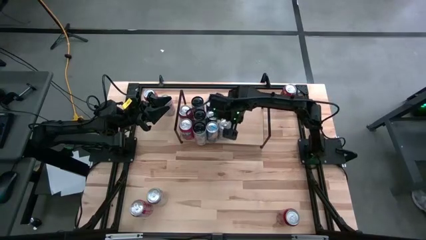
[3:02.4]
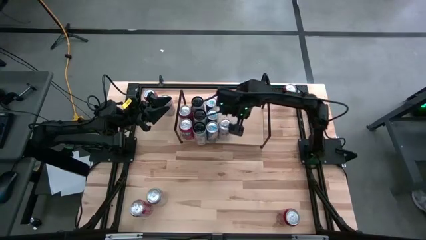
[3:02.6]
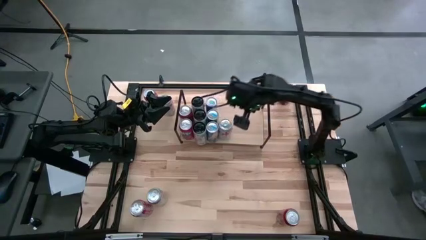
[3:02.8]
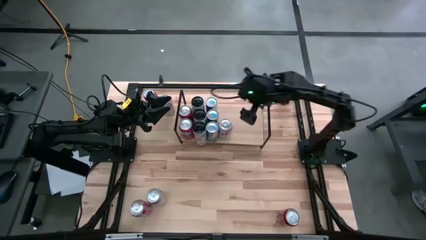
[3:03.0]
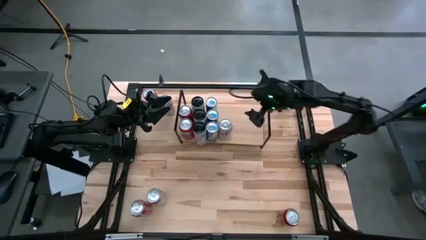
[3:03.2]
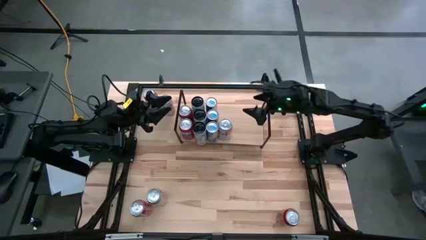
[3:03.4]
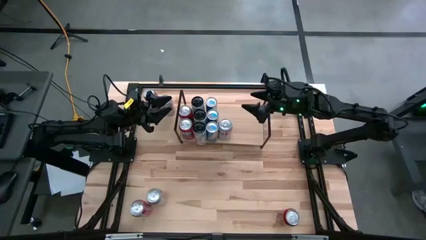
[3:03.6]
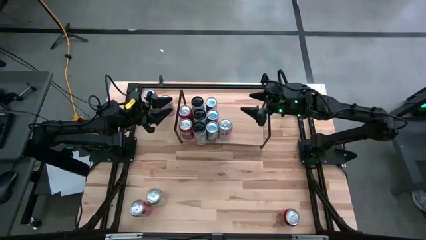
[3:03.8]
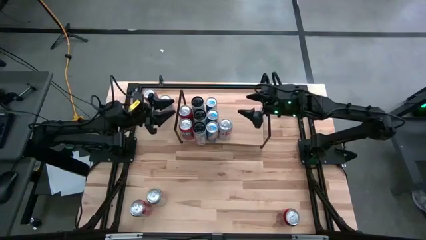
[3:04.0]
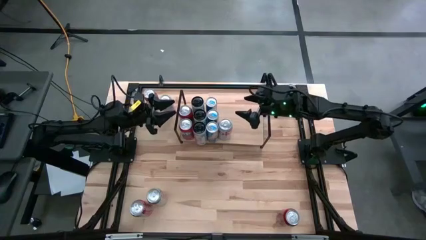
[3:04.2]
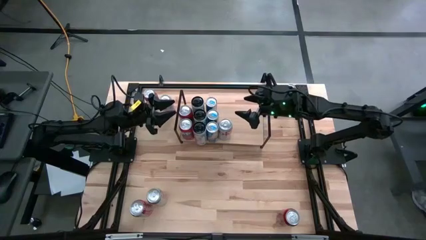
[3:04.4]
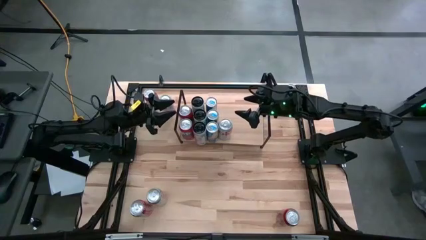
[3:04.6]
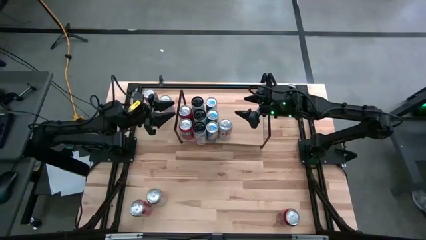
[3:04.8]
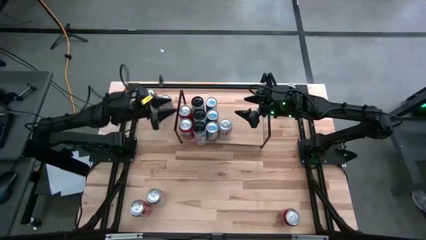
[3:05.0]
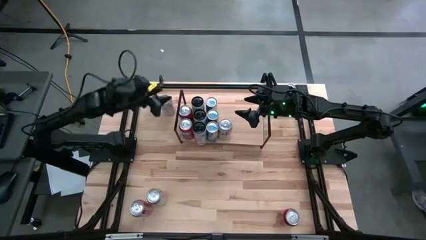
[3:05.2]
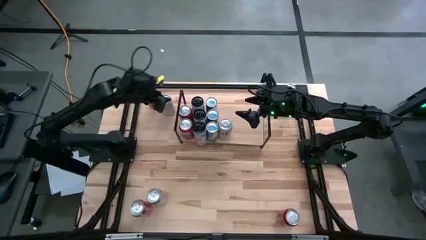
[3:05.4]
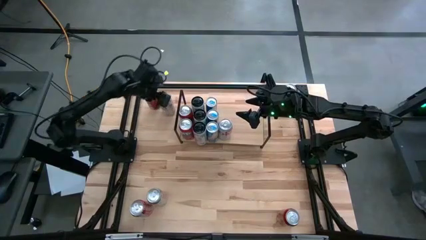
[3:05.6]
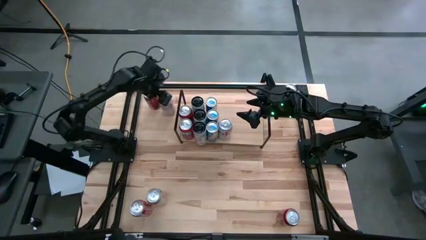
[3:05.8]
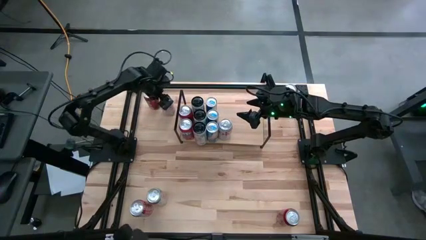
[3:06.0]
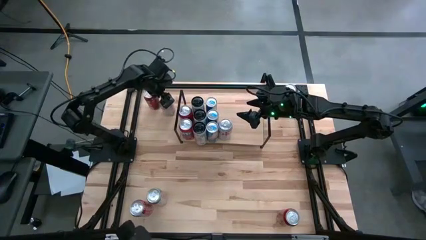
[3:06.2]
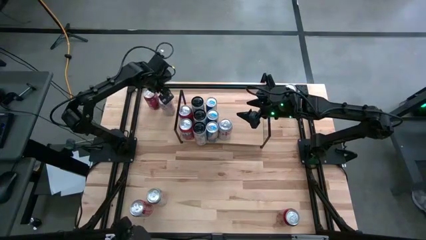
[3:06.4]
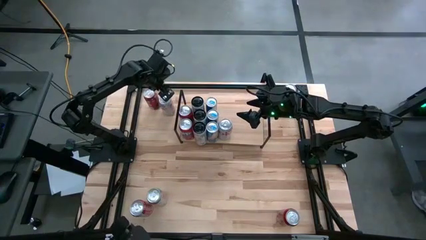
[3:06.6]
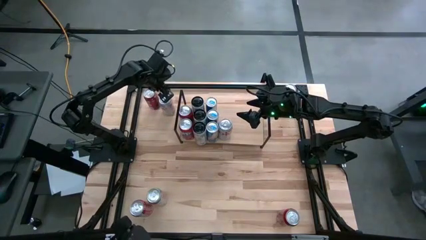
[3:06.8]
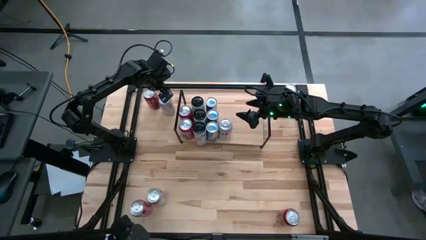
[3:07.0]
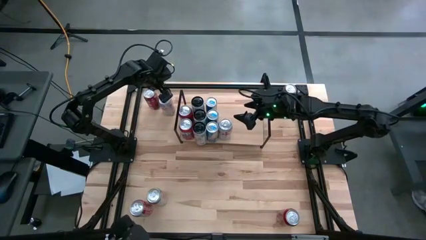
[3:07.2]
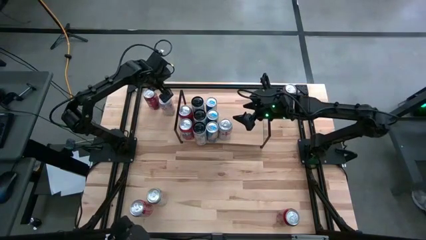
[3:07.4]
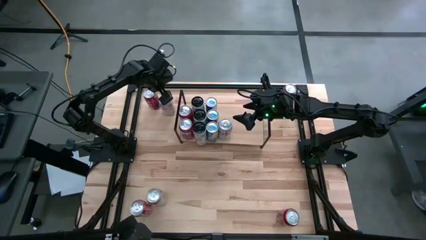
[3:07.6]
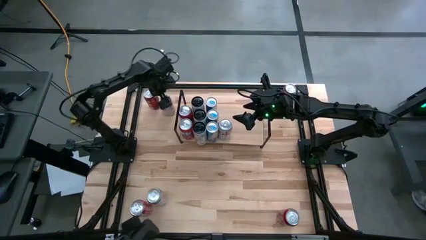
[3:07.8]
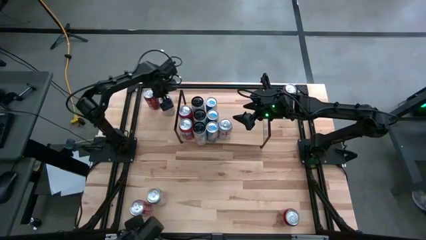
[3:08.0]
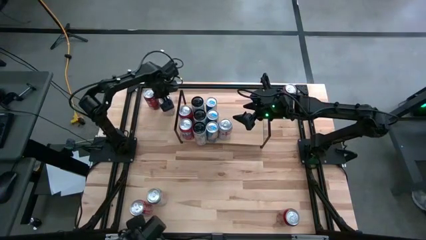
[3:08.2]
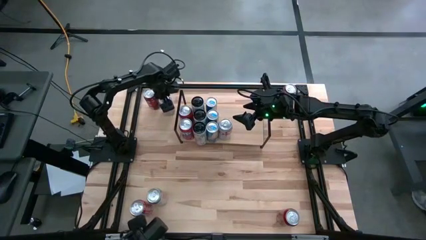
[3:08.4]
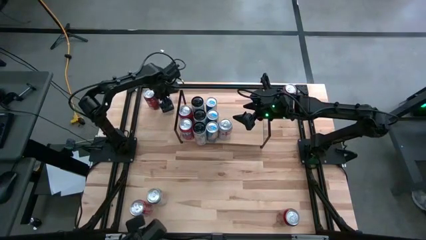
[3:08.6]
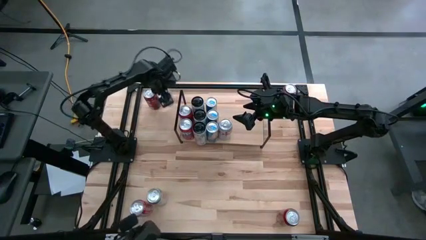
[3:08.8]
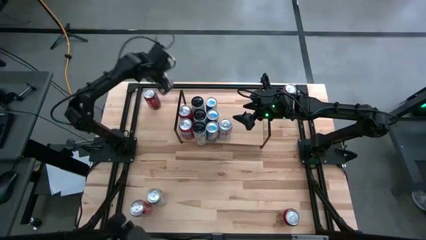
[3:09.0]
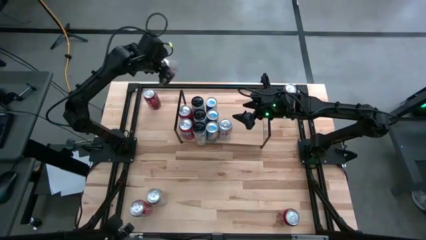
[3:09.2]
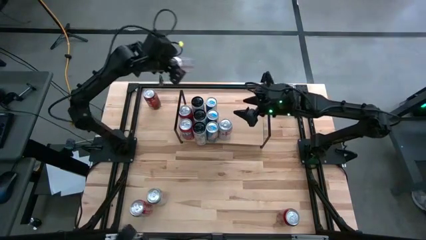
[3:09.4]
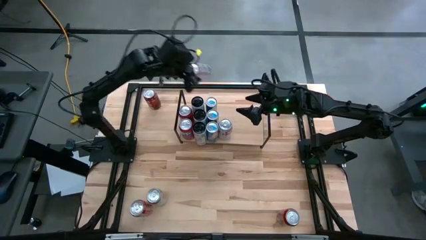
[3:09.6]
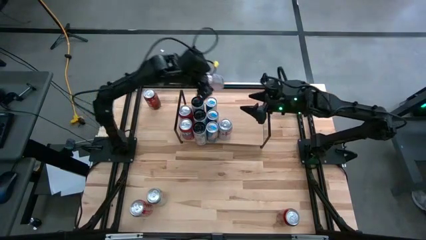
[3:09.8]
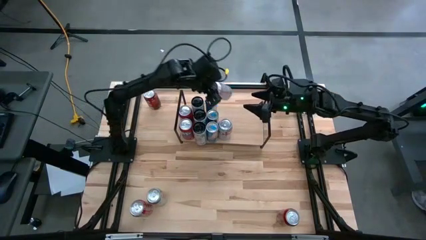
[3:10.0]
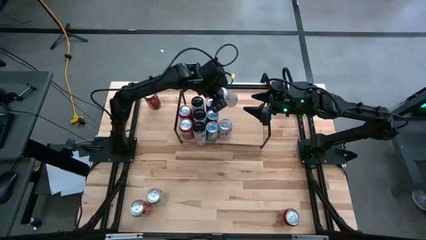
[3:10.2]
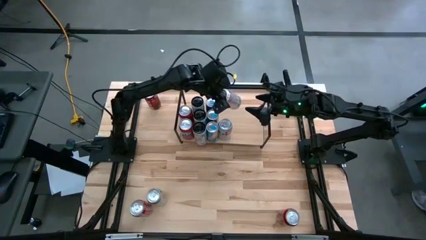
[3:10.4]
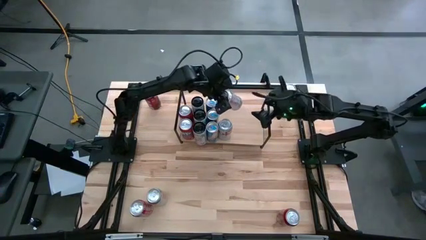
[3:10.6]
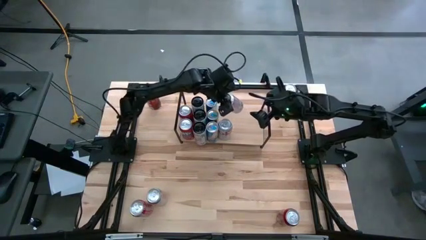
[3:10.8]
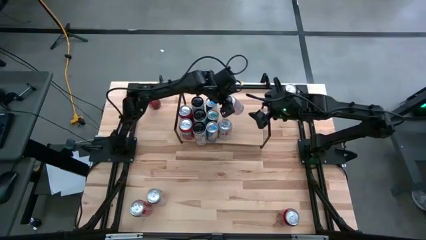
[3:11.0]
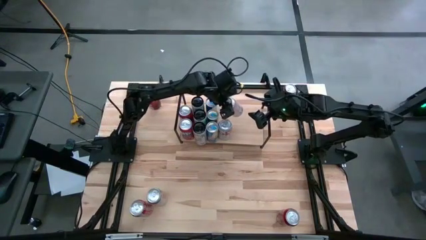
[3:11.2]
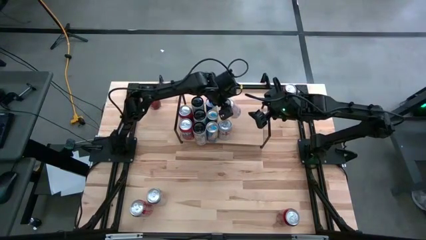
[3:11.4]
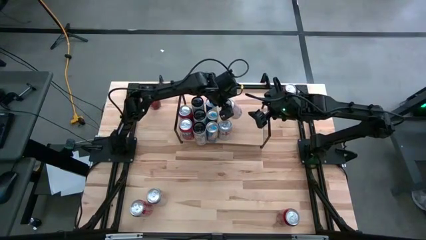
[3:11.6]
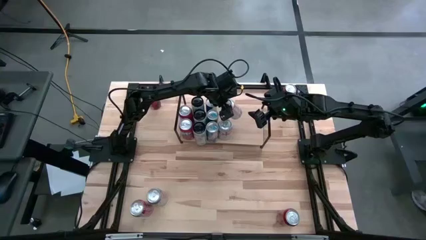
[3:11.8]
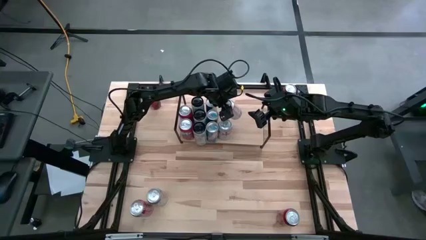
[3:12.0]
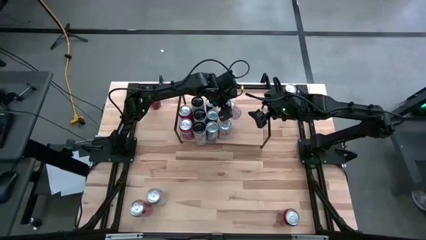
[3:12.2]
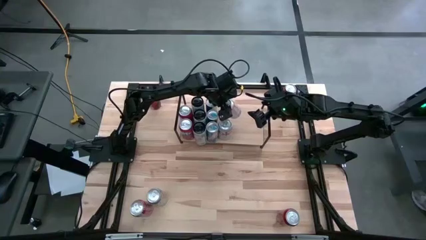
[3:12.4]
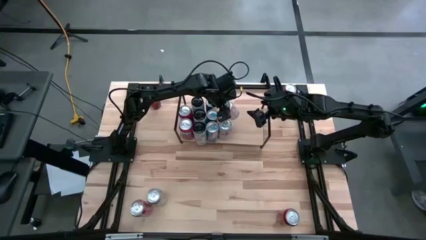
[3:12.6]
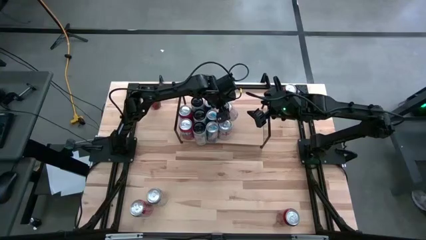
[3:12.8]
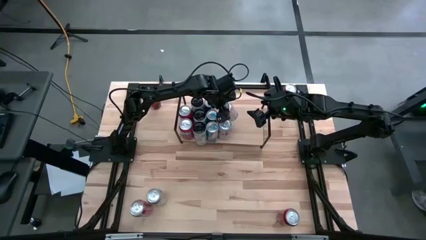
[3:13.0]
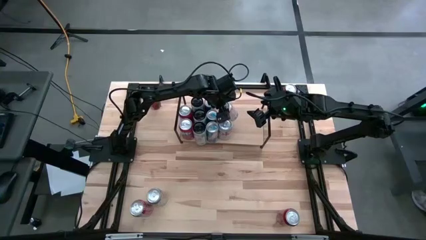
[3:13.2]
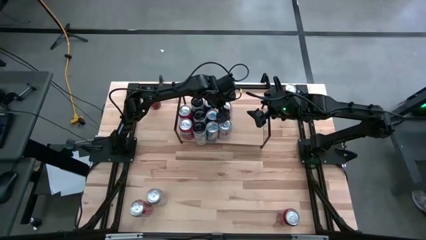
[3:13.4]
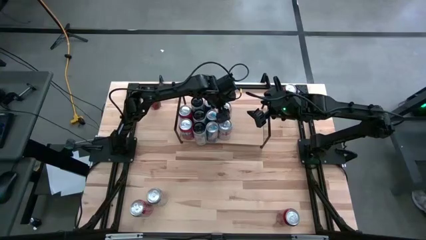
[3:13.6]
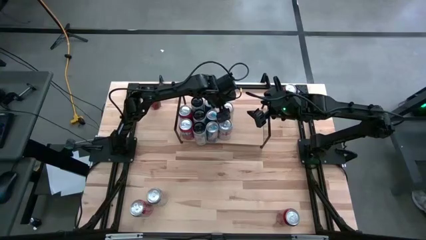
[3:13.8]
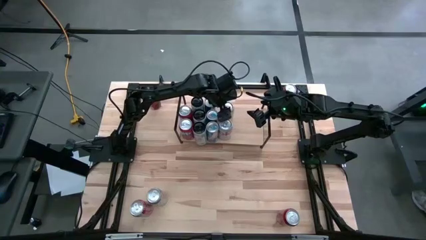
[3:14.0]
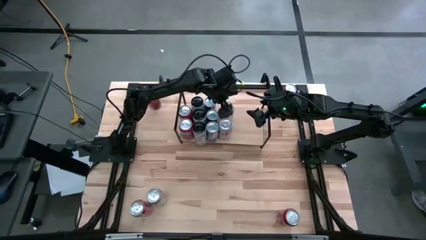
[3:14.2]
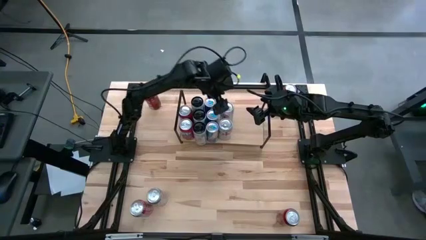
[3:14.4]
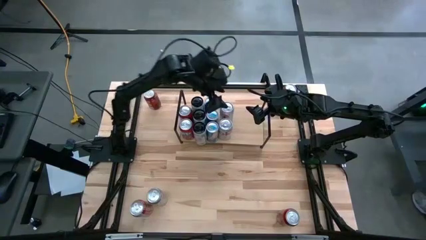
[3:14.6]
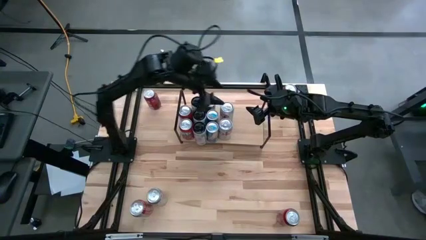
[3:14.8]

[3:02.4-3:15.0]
Task: Place canned beverage on shelf
Put the top red-silver soda can on the shelf aligned with the other red-silver soda can

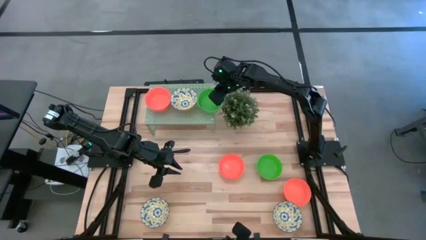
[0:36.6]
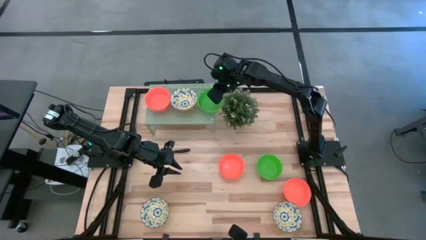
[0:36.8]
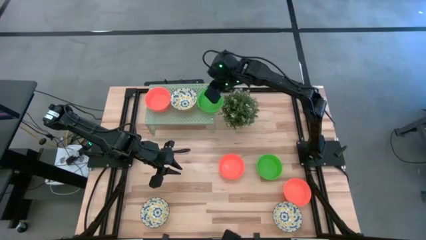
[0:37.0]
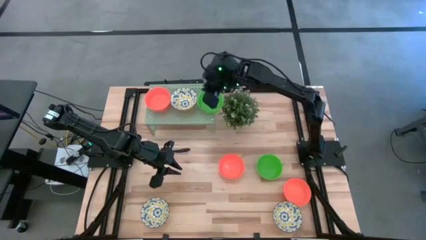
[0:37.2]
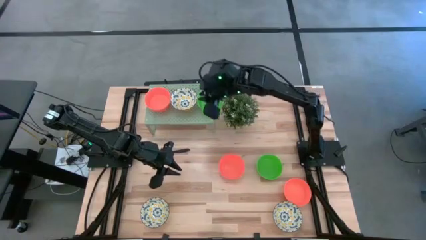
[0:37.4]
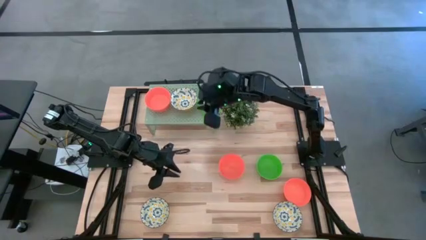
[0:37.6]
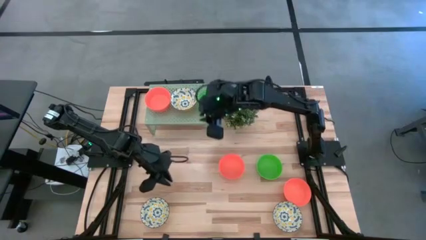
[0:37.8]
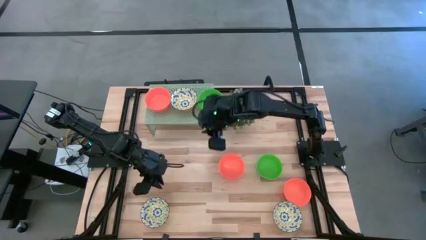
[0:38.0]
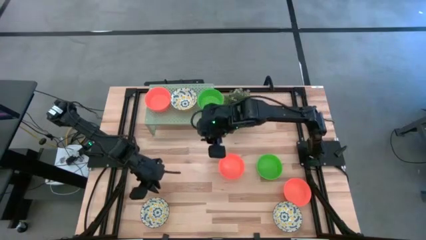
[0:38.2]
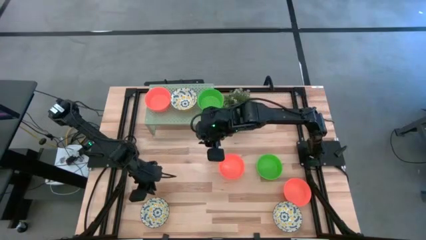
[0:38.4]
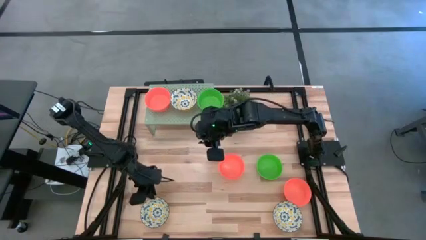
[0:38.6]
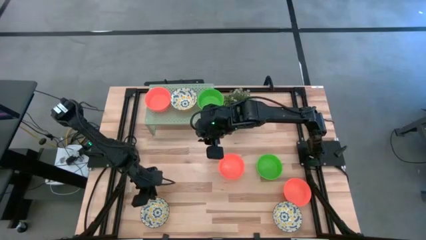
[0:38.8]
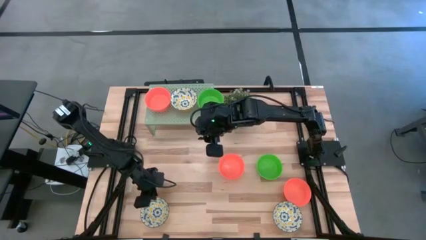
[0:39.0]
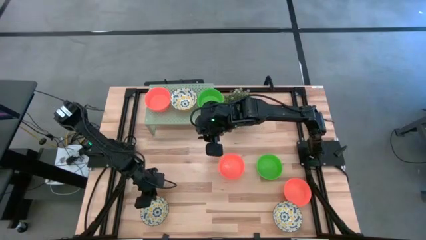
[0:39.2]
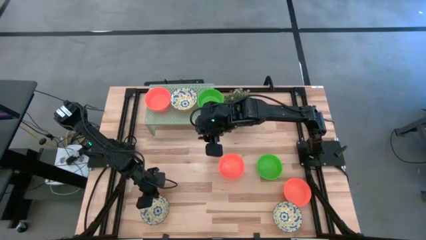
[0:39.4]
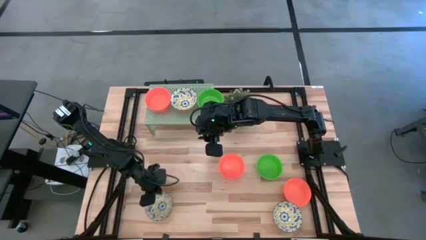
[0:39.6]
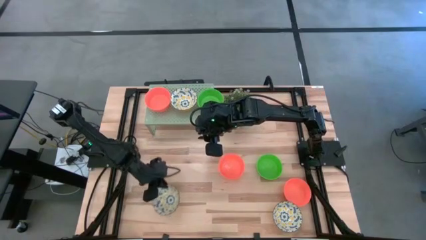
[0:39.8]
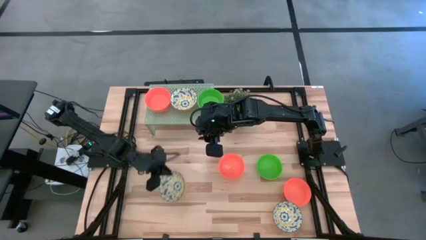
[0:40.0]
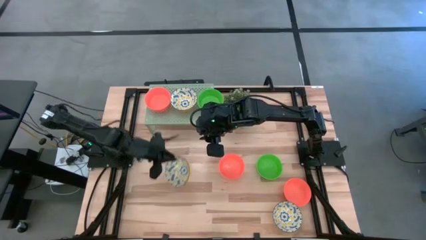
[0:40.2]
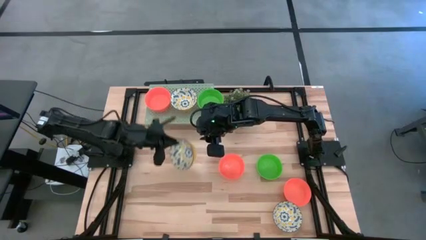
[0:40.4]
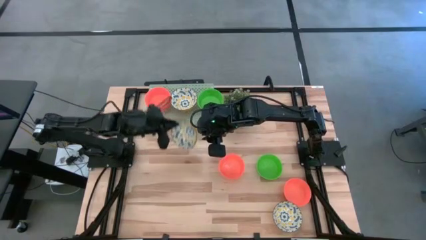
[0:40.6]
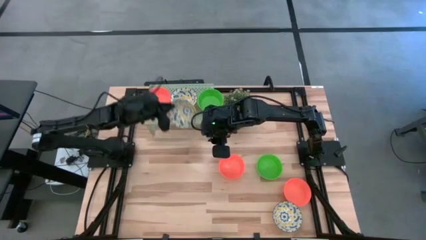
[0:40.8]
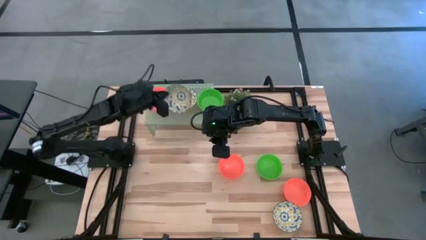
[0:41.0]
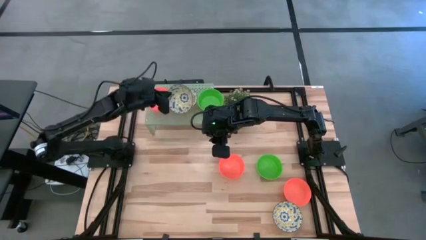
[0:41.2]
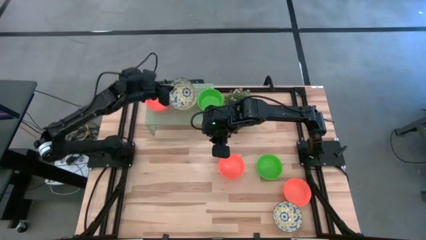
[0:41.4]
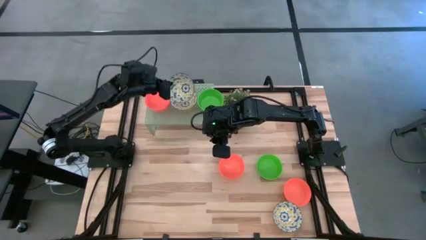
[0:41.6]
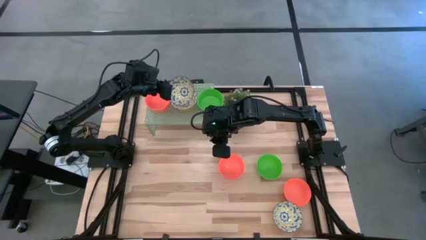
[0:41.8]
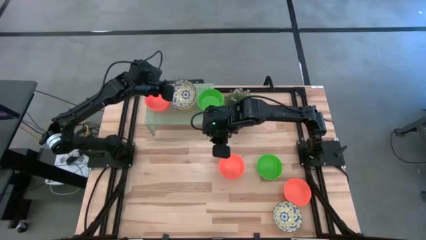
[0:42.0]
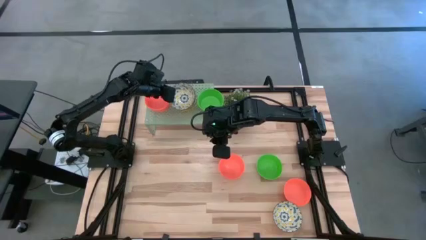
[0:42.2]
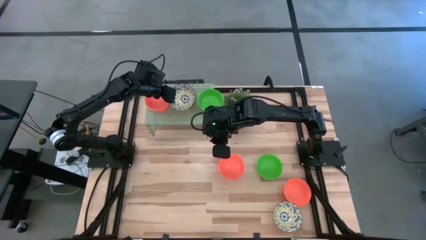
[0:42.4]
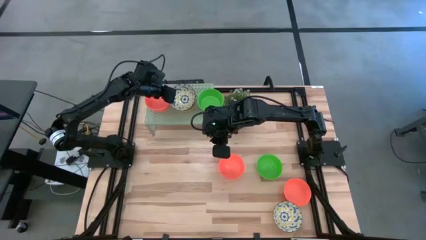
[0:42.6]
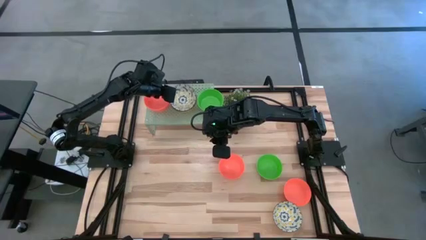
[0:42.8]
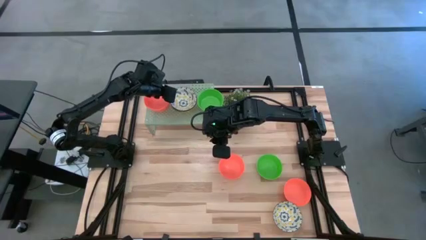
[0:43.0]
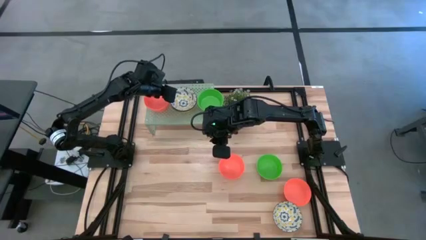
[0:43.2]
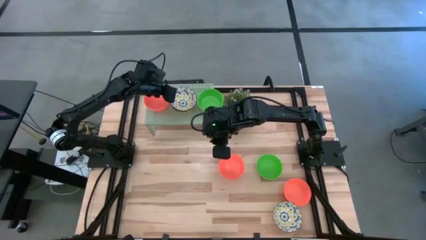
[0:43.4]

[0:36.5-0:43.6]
Task: Pick & Place Mini bowls
Stack the white pattern bowl on top of the white pattern bowl on the shelf
